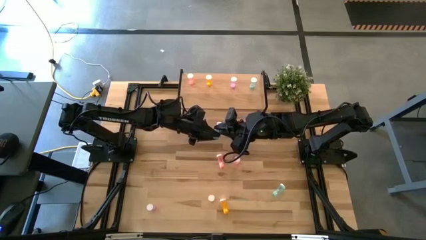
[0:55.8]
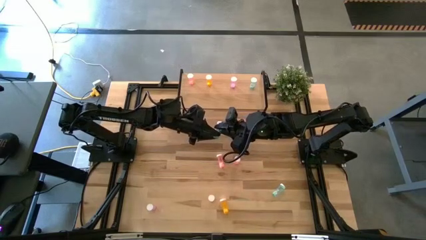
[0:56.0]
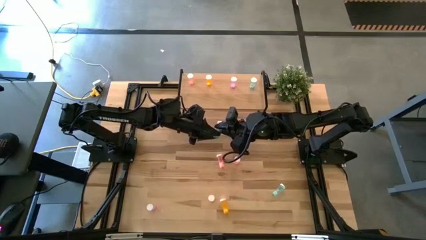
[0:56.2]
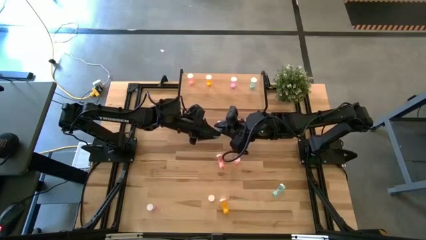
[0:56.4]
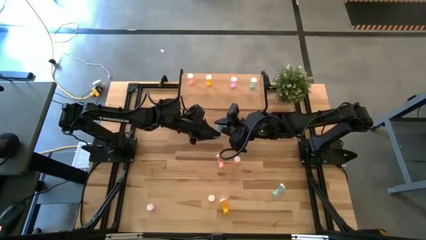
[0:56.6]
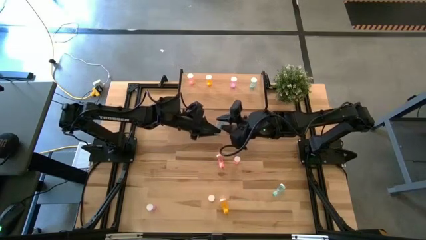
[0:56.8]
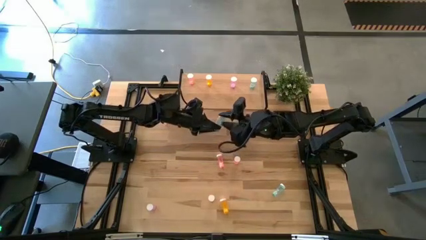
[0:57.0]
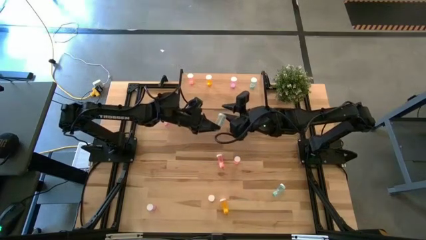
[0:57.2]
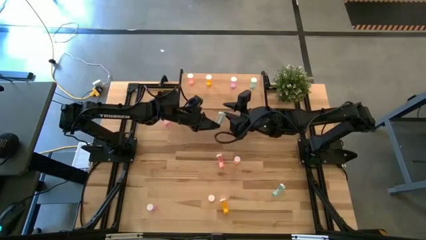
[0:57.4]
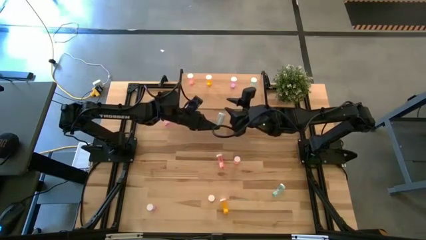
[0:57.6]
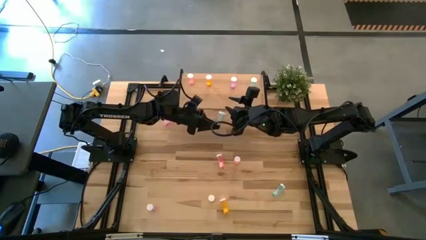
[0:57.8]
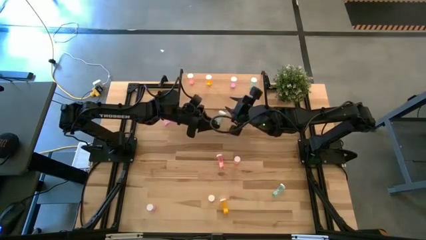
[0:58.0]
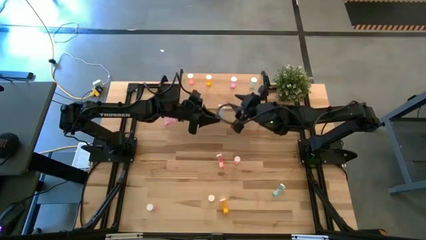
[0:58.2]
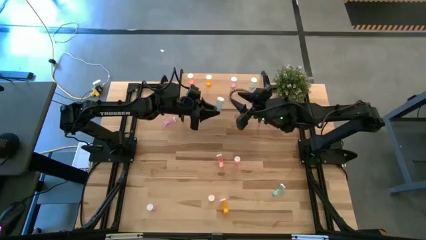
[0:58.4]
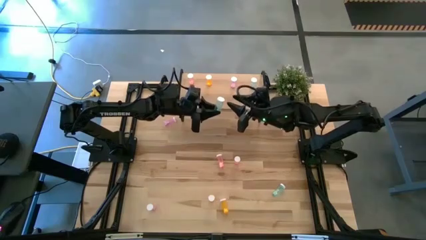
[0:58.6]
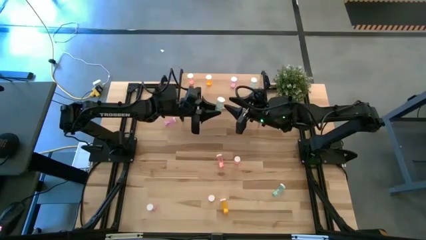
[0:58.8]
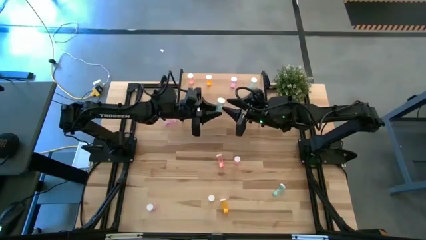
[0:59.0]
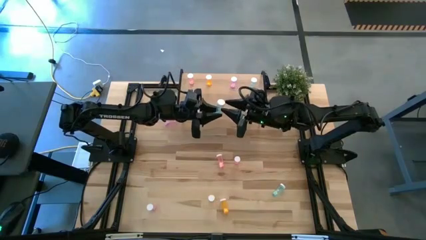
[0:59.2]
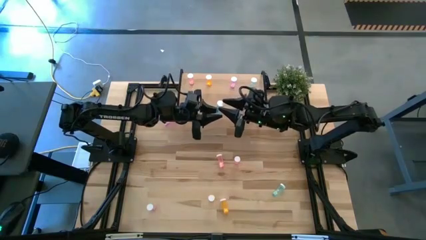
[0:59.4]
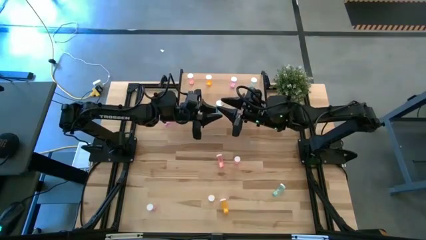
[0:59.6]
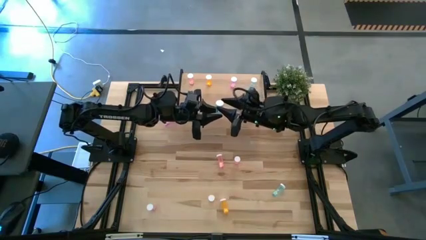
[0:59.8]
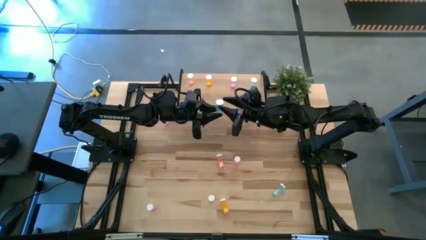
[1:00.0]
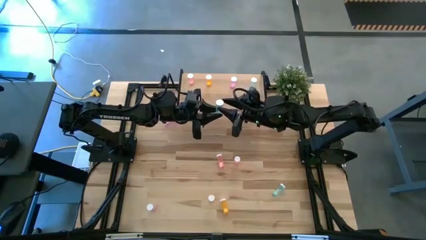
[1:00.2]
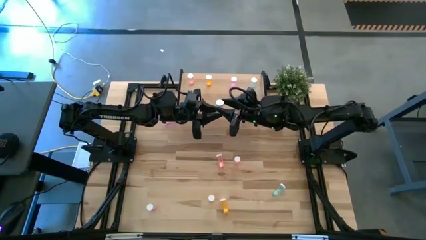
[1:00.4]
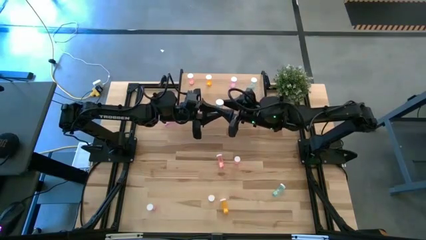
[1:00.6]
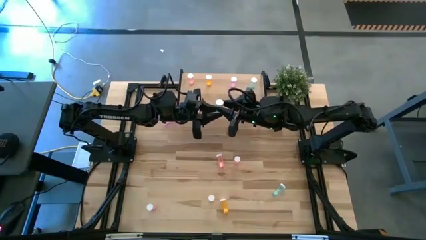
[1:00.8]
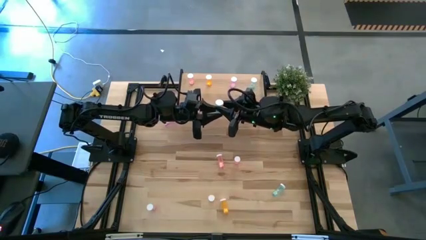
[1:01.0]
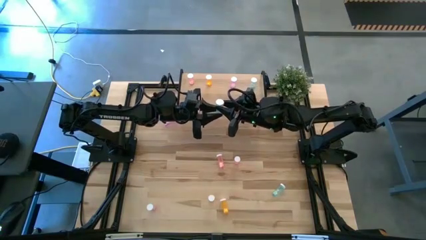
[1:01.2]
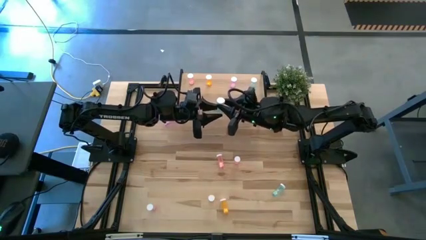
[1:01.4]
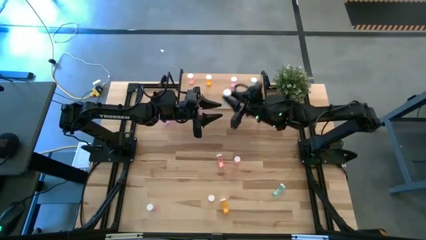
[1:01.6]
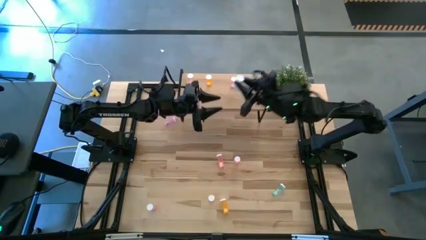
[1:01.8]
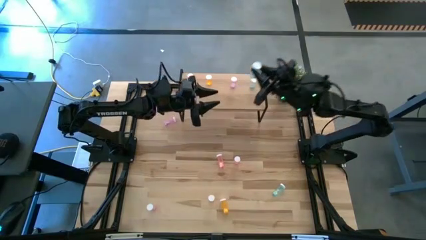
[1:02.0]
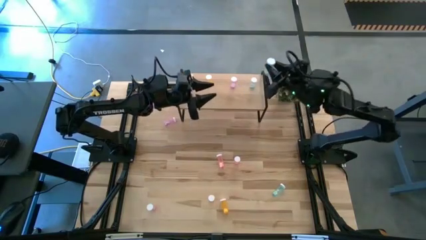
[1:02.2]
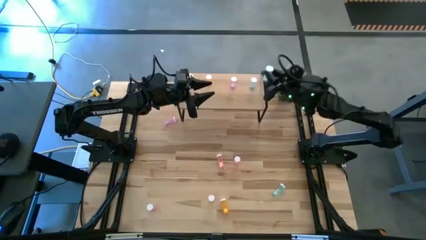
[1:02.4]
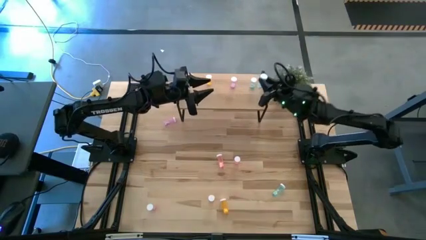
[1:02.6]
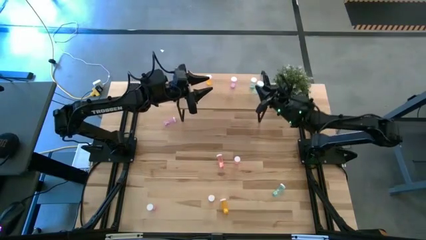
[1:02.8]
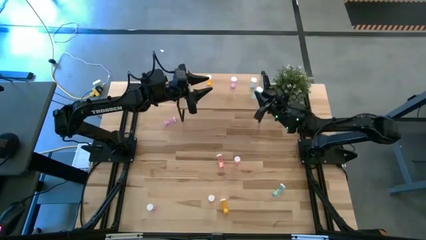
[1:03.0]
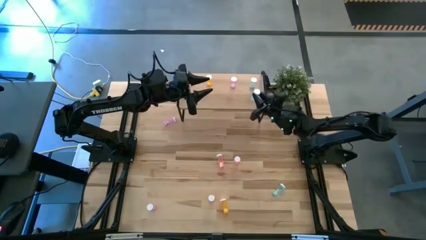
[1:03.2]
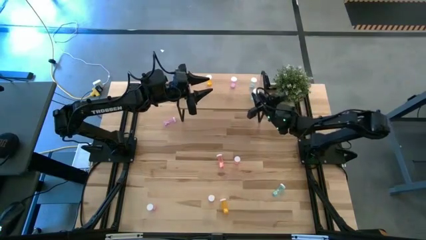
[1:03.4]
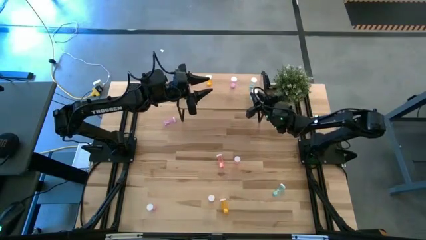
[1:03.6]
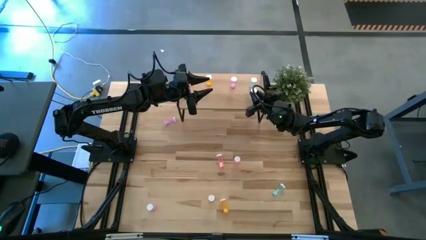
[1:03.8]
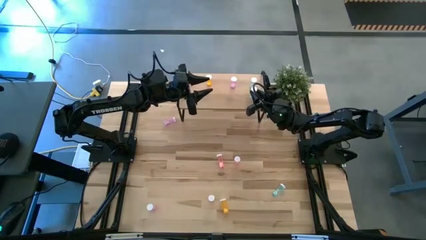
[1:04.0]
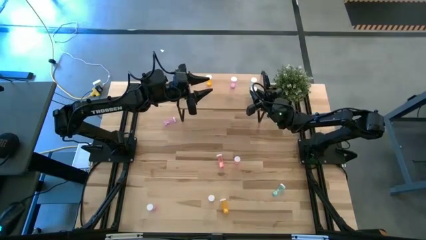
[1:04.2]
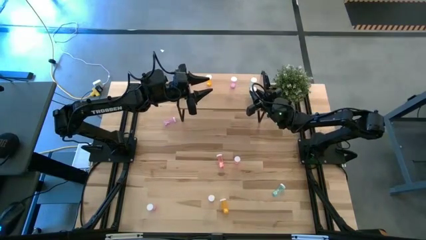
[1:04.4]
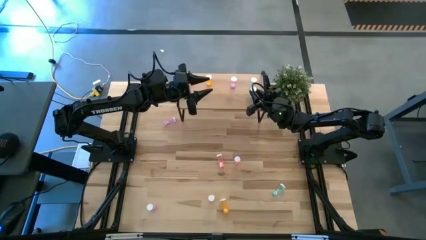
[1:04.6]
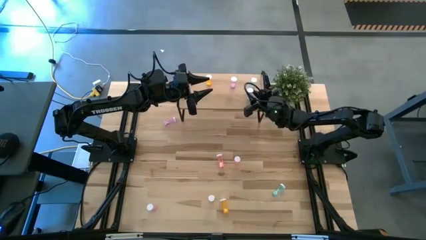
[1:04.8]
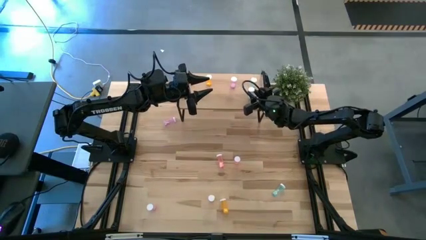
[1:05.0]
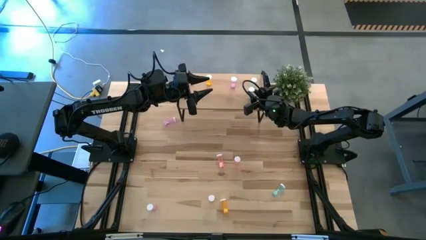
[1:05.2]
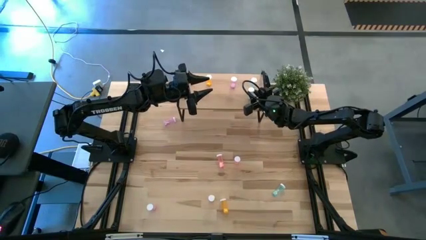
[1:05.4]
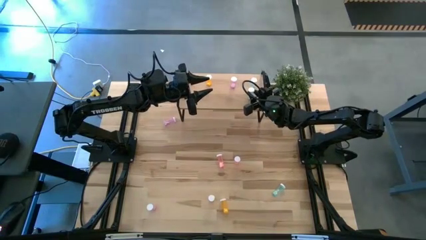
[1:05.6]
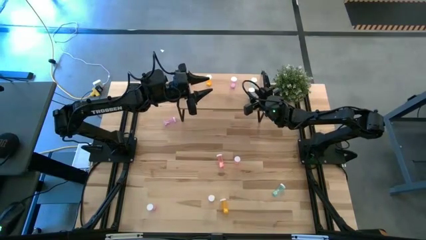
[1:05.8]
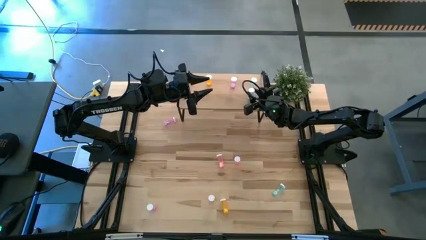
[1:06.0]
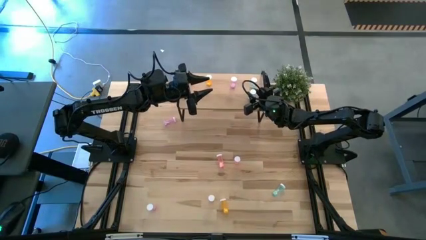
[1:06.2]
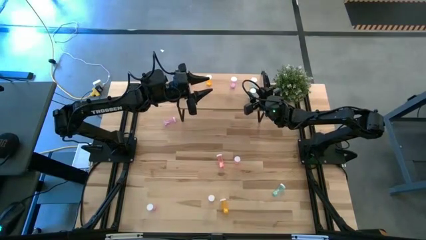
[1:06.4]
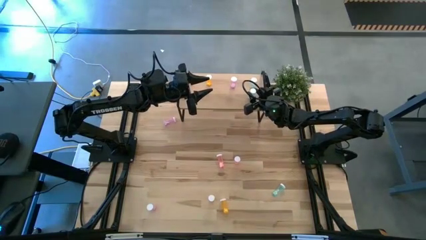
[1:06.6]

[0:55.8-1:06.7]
Task: Pick and place medicine bottles onto shelf by color
Put the top blue pill bottle on the shelf aligned with the other blue pill bottle

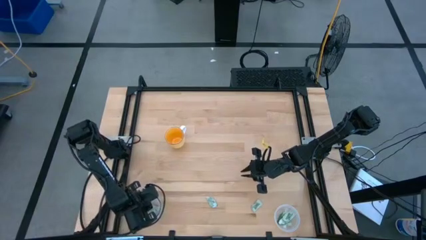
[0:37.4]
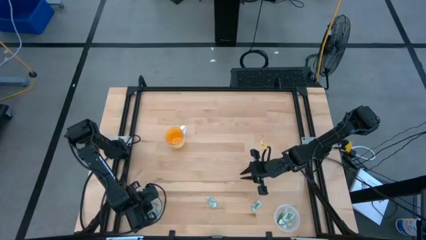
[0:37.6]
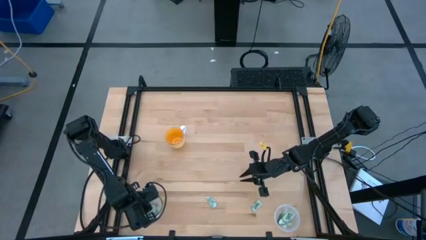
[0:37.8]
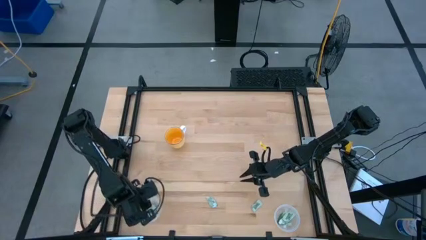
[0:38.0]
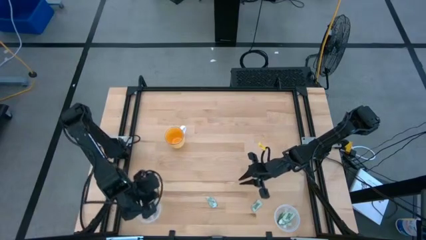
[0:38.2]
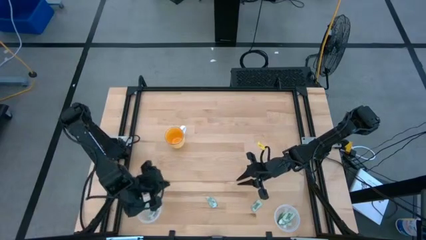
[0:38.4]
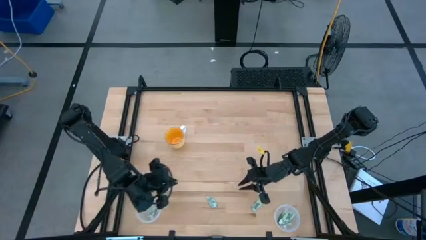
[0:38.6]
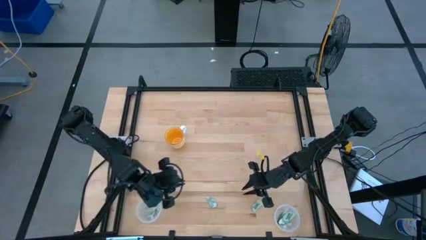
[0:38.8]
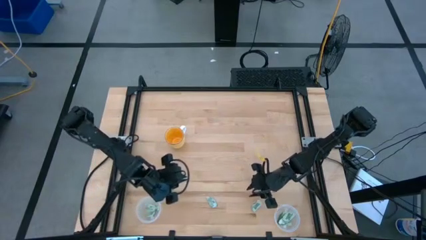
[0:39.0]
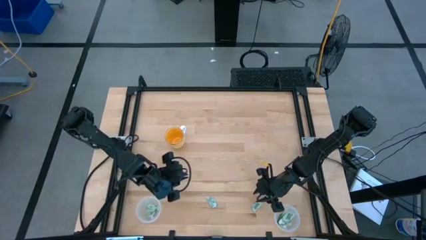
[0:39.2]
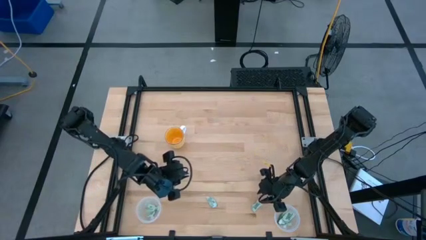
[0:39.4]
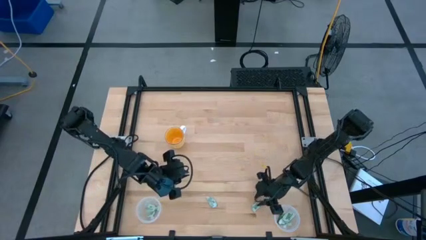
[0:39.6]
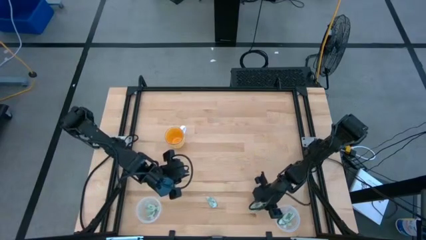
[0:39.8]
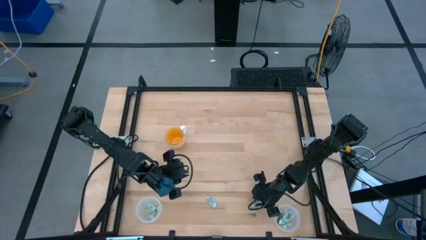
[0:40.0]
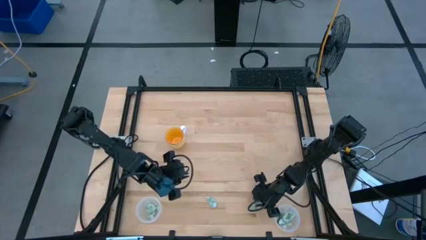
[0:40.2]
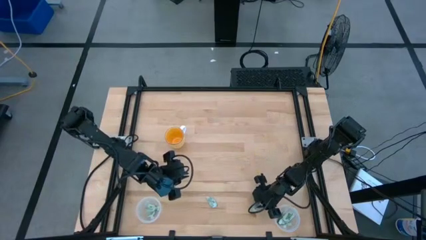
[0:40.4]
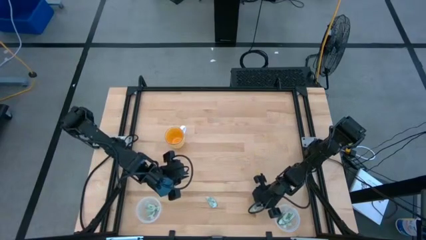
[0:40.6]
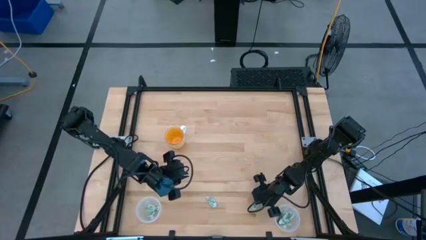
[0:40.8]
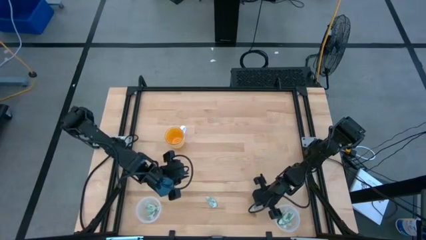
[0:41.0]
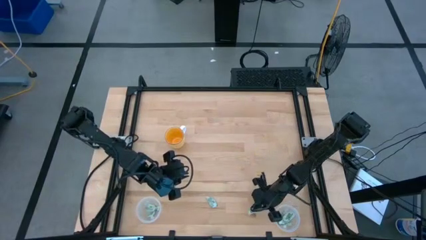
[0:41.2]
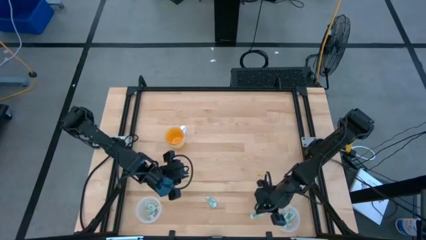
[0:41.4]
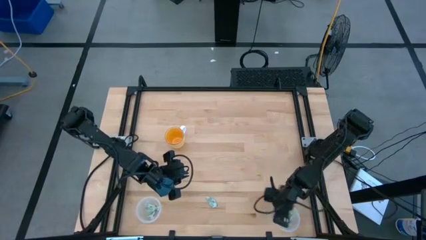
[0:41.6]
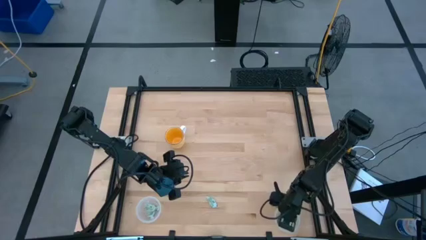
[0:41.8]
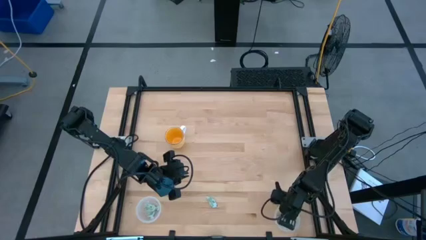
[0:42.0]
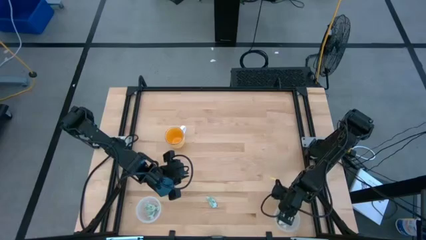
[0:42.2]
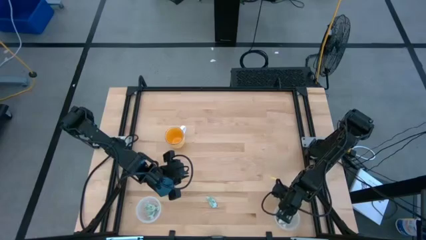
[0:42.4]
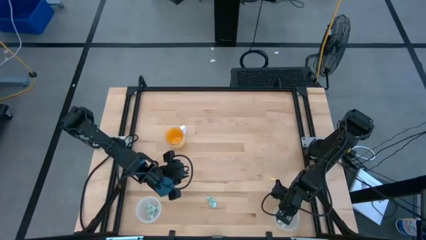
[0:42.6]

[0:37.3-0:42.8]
Task: Pick and place items into bin
Put the stevia packet into the right transparent bin

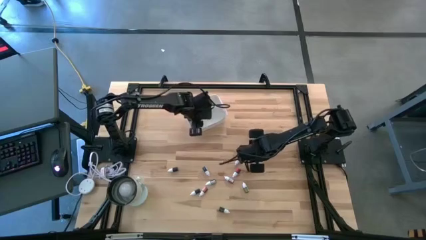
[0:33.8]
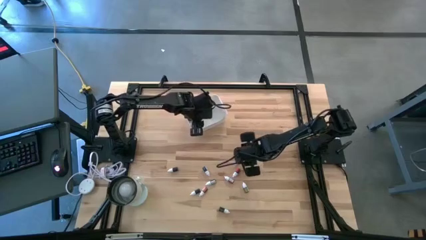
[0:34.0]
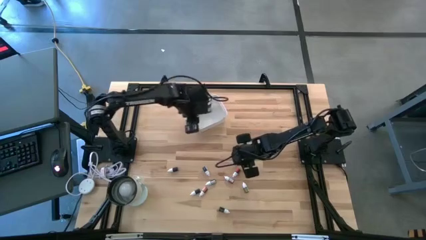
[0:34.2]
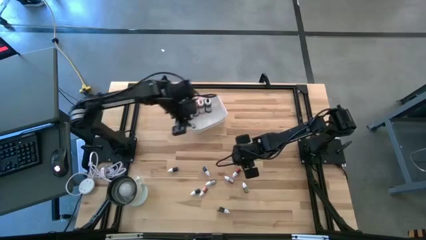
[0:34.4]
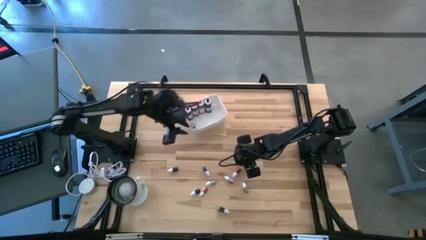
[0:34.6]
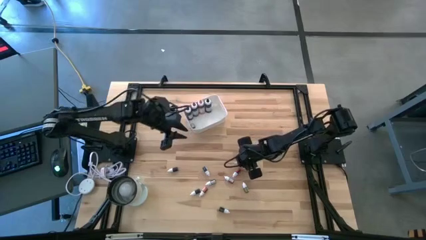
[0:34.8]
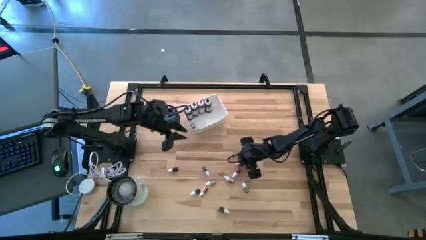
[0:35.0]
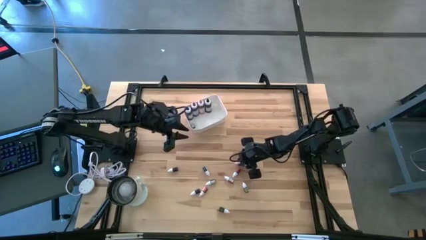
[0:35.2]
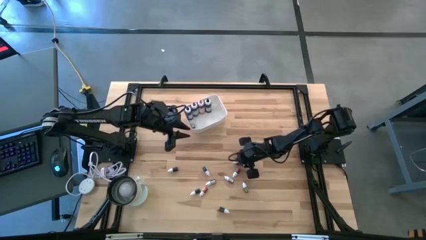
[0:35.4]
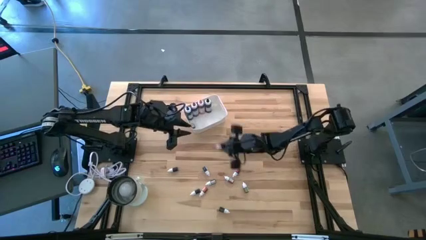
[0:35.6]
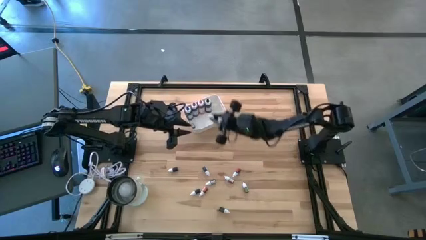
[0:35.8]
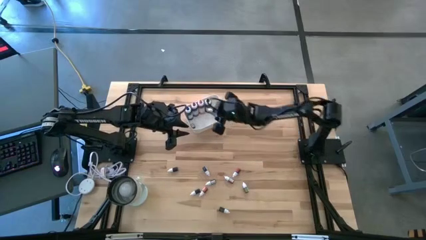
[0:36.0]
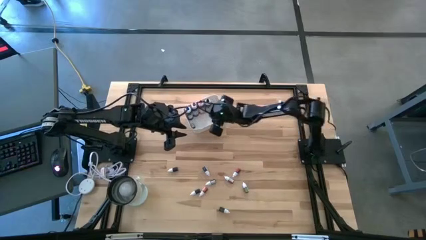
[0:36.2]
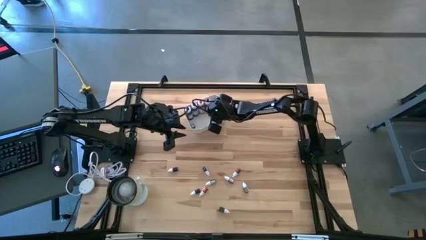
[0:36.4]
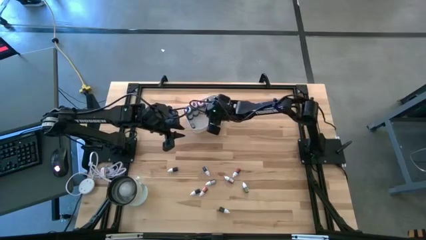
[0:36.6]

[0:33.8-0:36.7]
Task: Pick & Place food coloring
Put the right small purple food coloring bottle into the white bin
